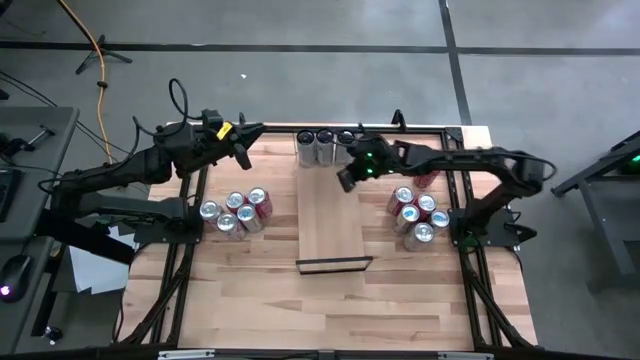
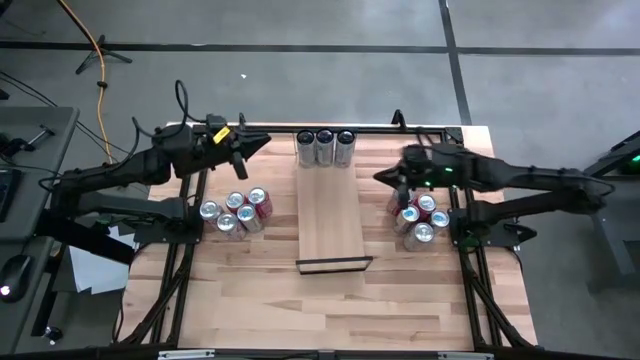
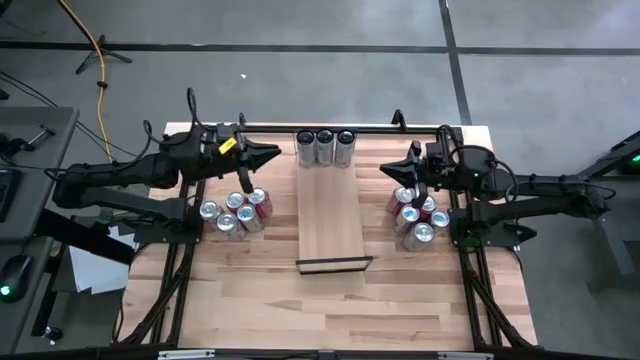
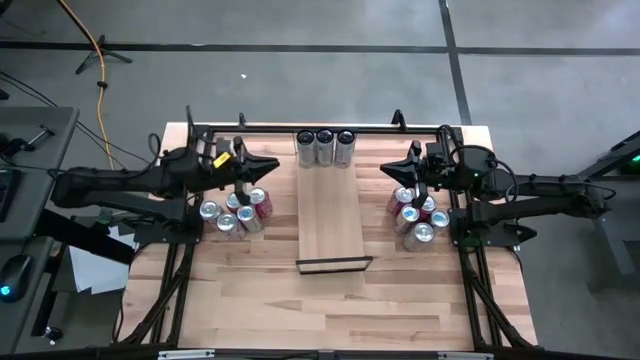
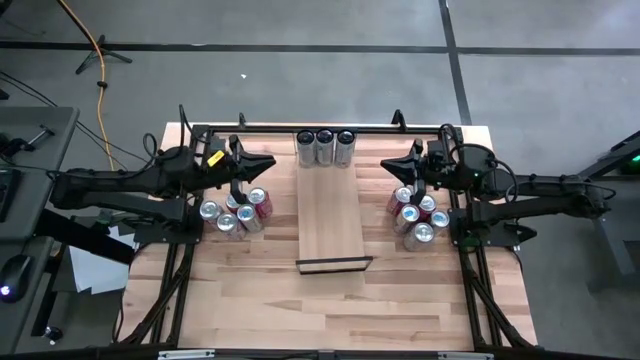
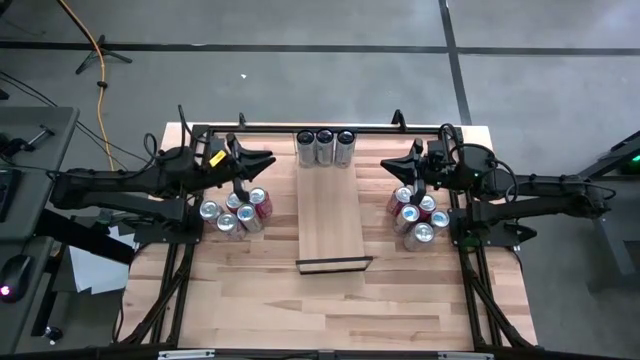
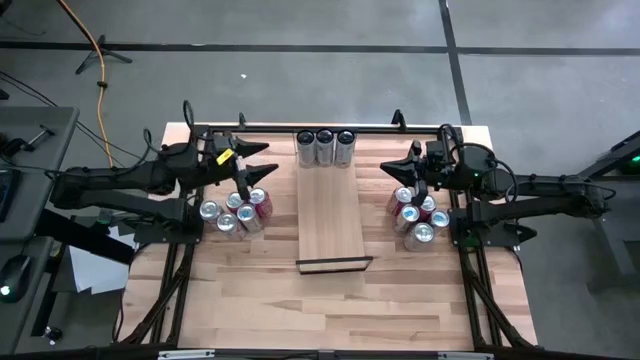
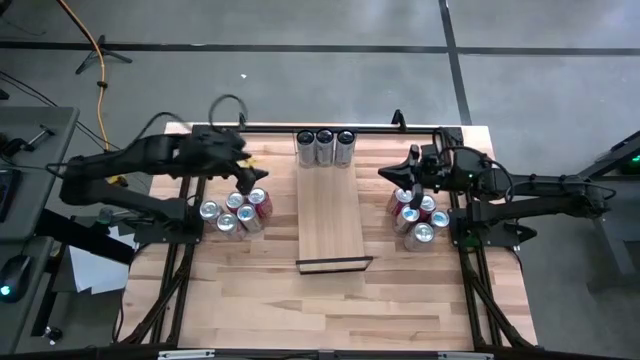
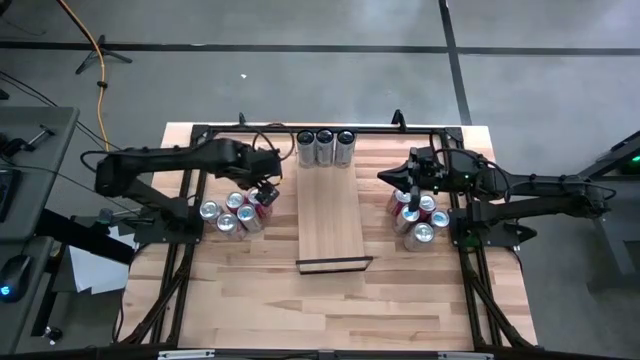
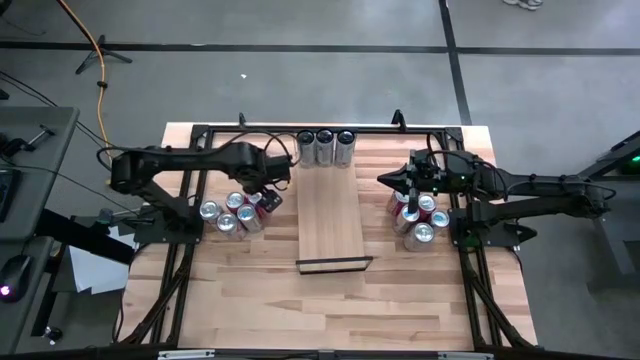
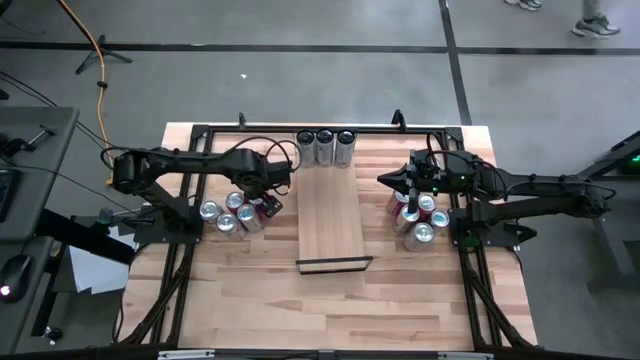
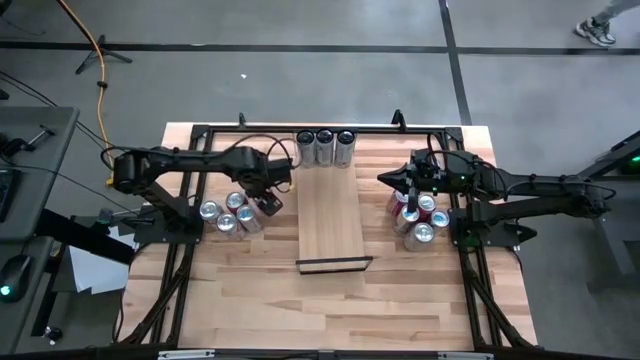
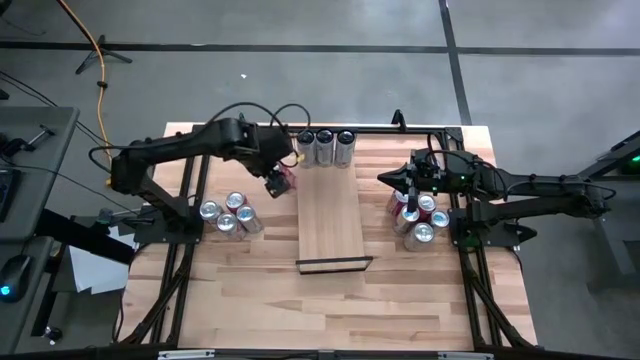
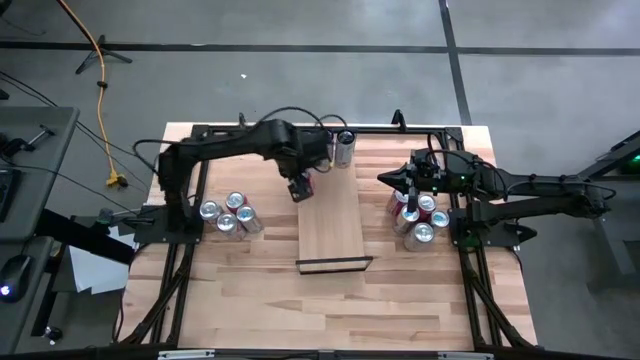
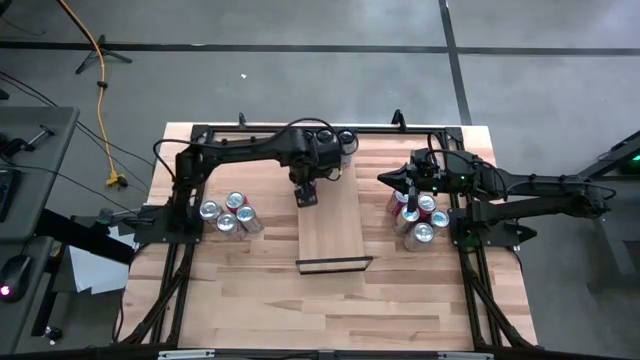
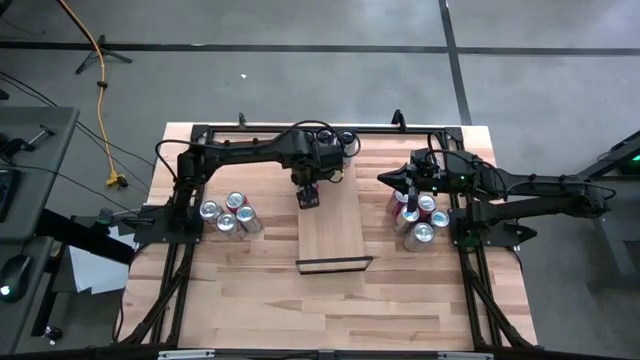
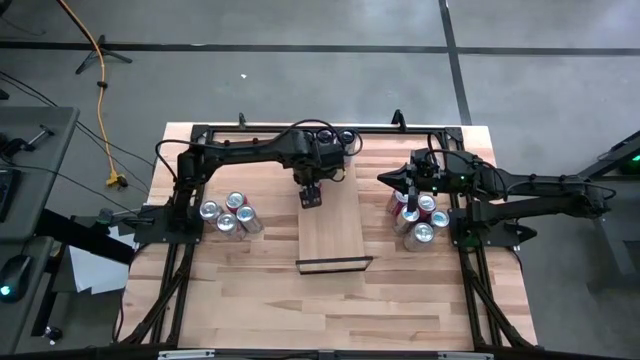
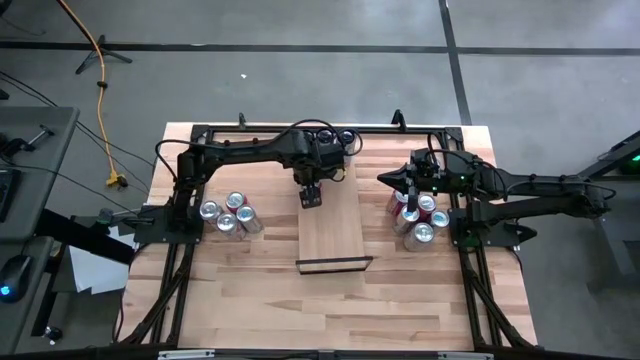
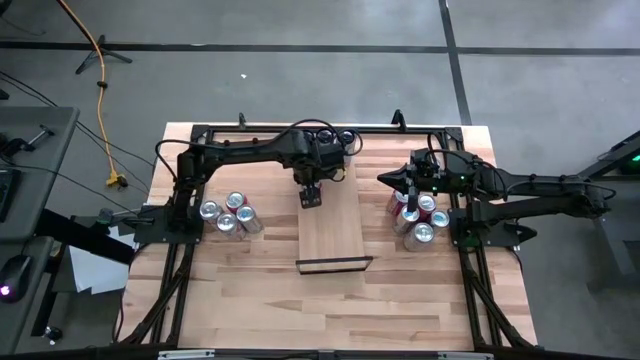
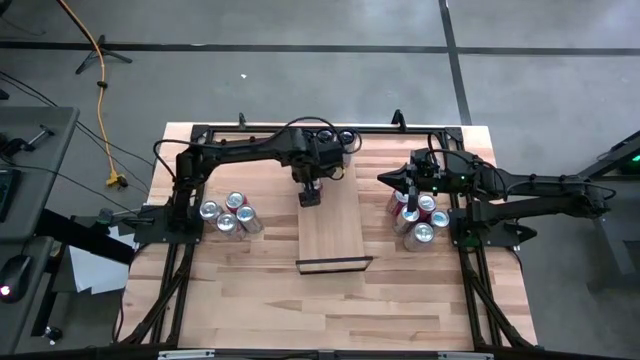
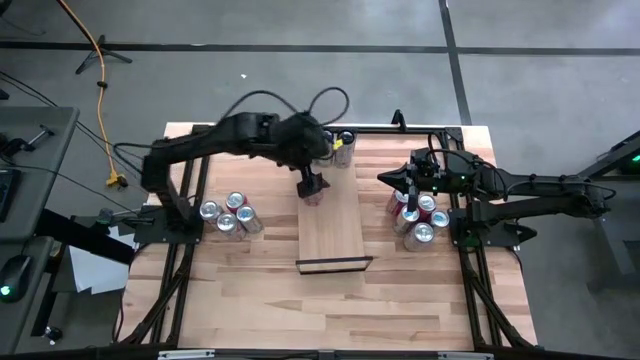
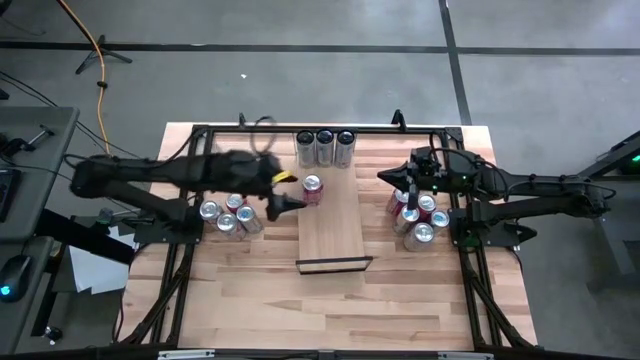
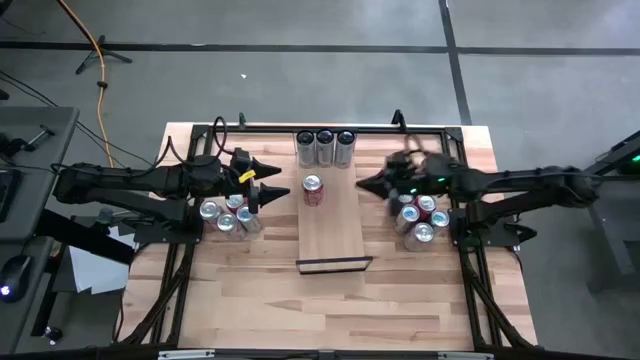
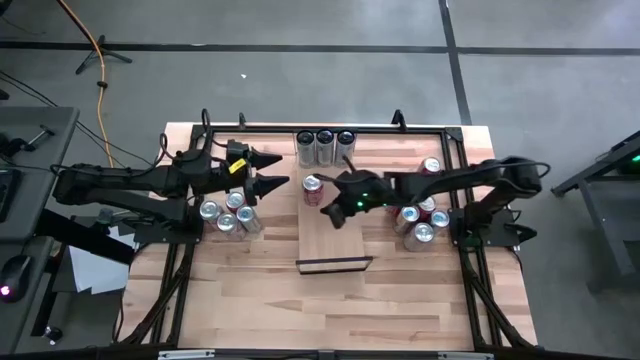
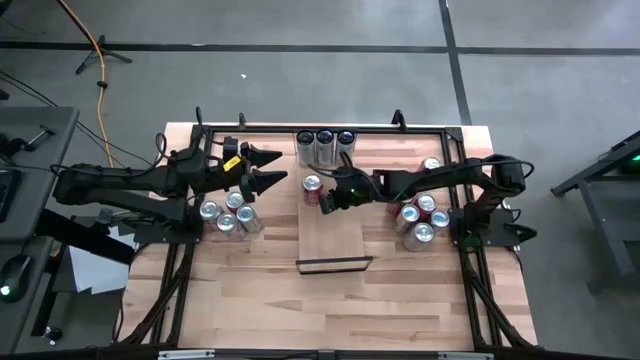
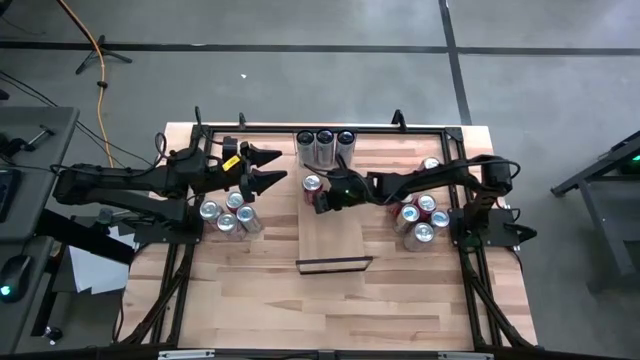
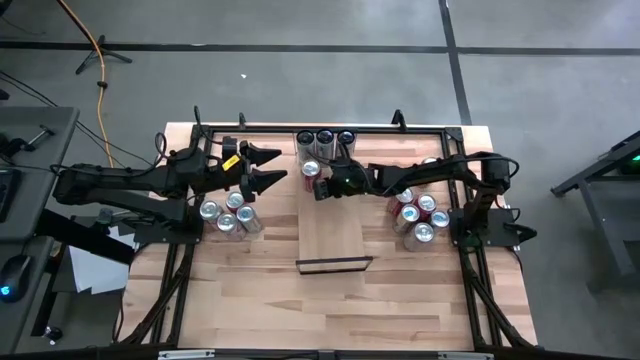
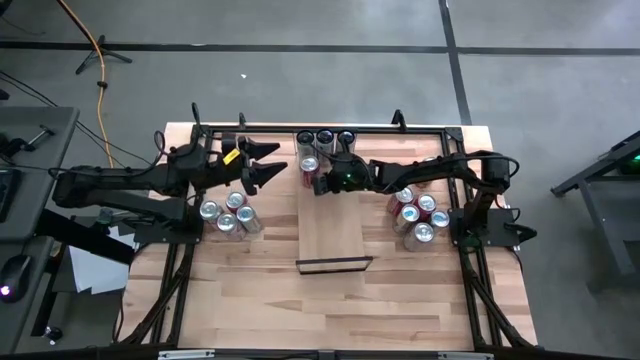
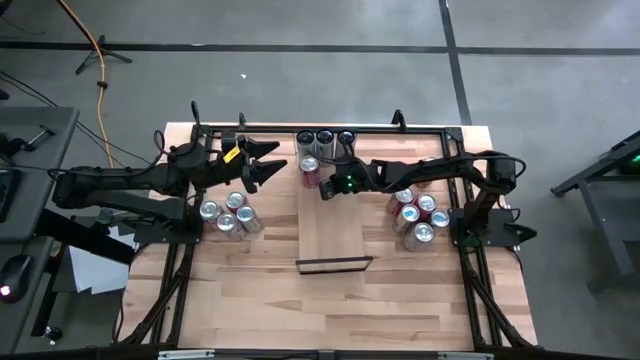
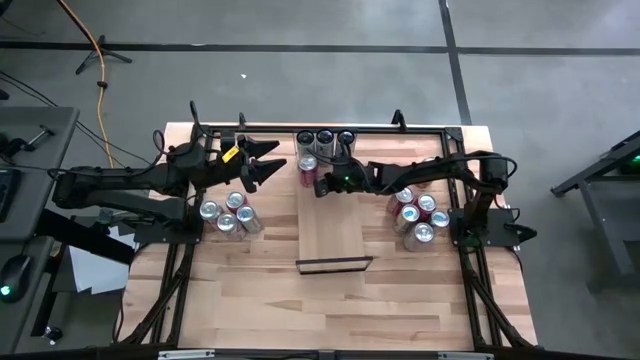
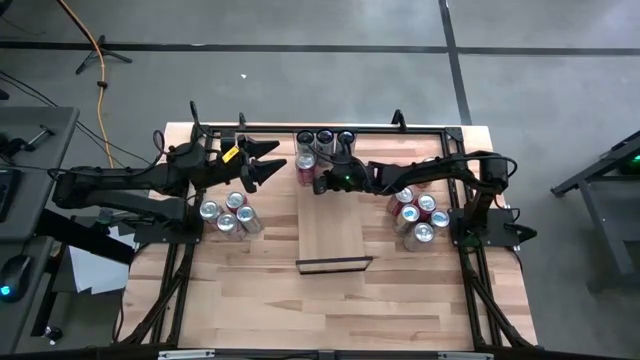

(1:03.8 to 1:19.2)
Task: Place canned beverage on shelf
Put the left red/white soda can on the shelf

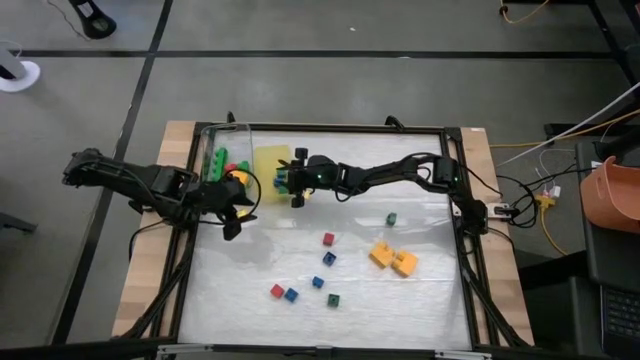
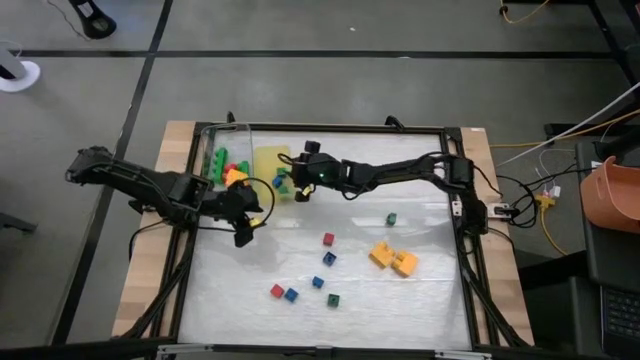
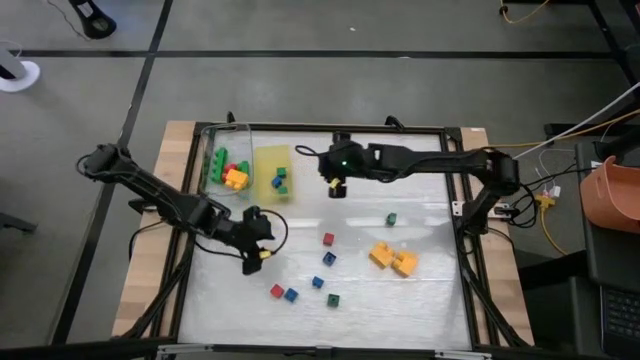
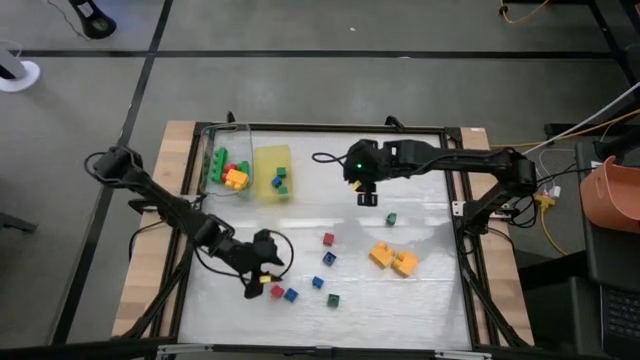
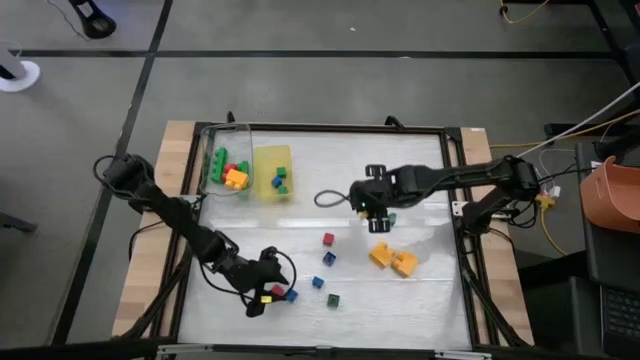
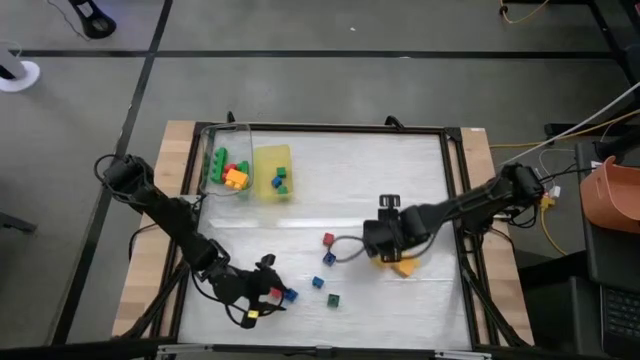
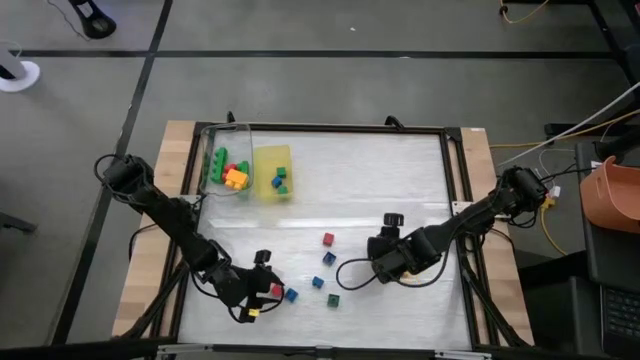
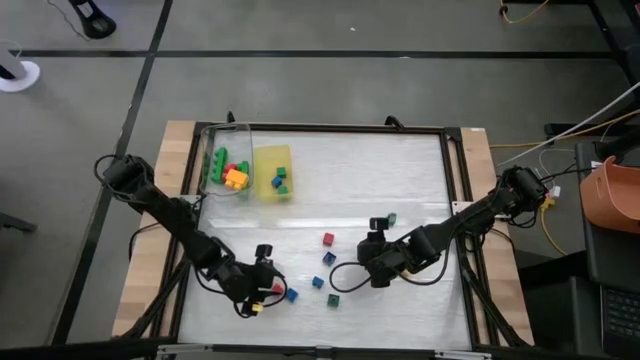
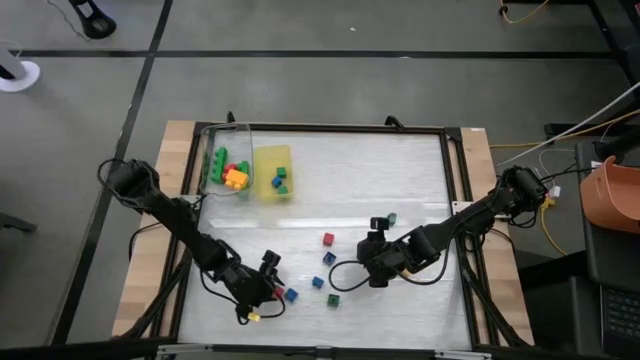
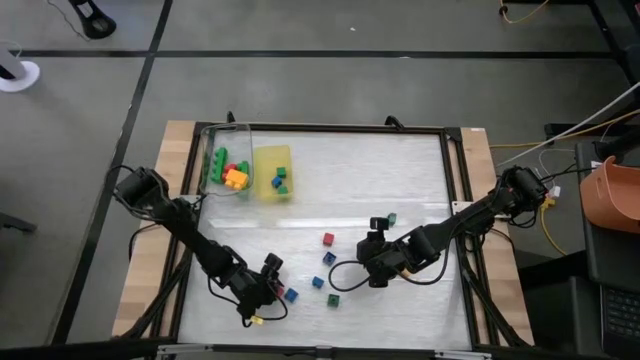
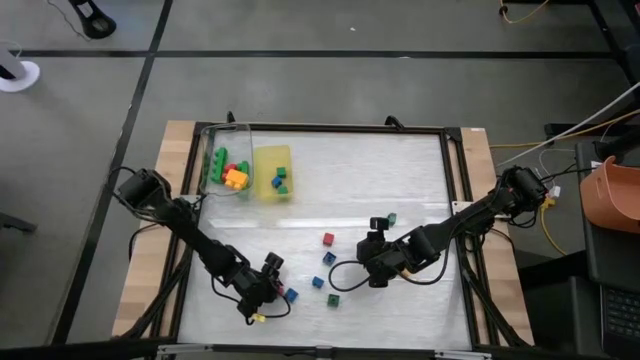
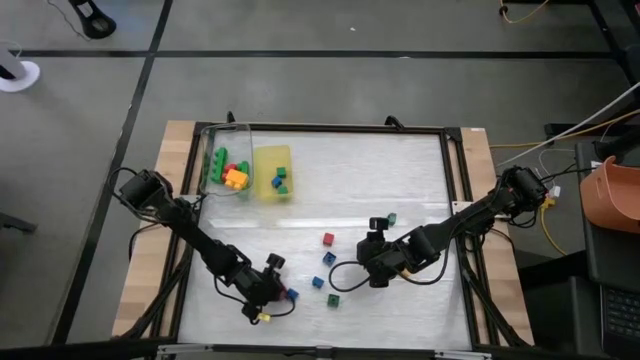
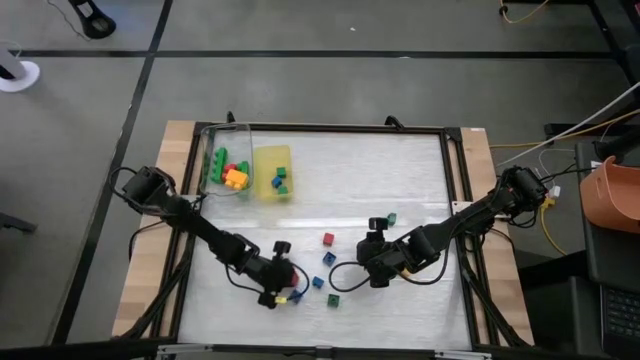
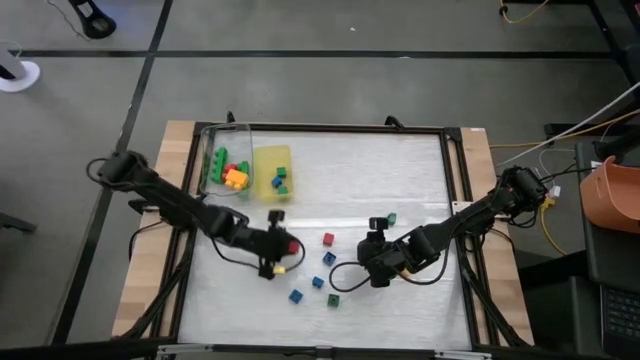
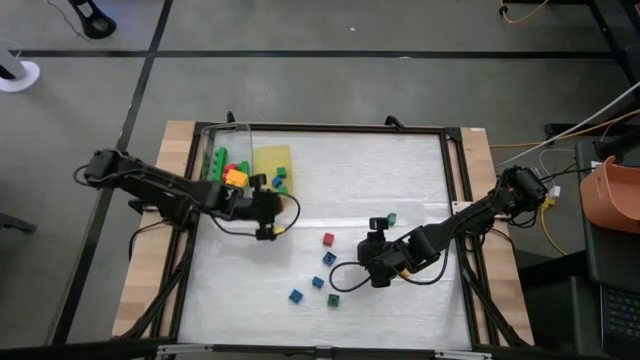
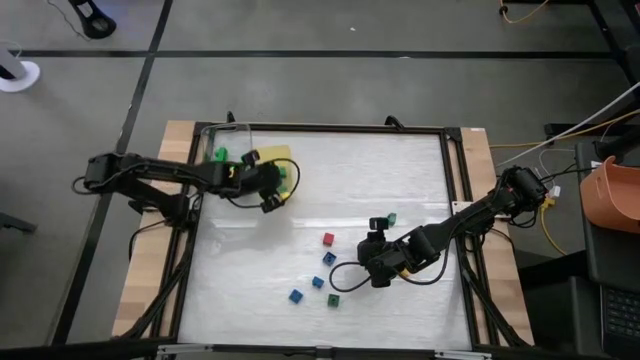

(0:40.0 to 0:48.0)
Task: Sort blocks by size
Put the small red game piece into the yellow bin
